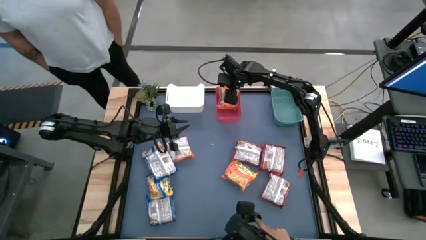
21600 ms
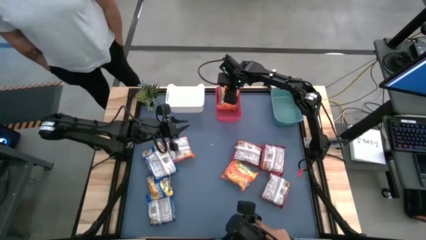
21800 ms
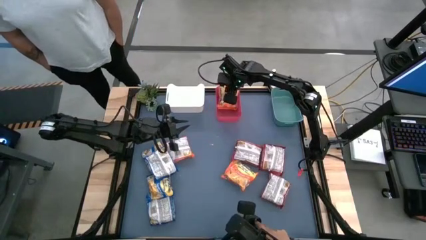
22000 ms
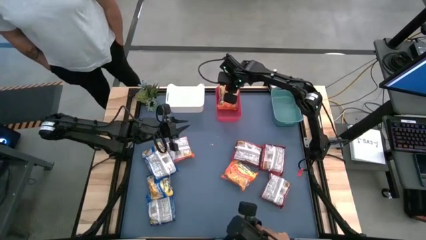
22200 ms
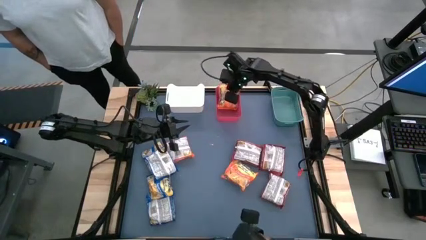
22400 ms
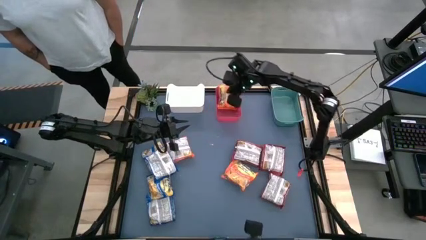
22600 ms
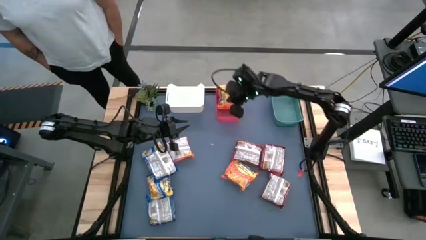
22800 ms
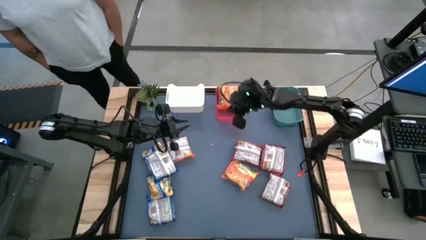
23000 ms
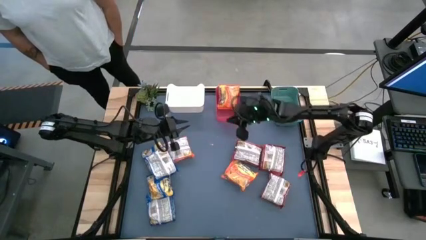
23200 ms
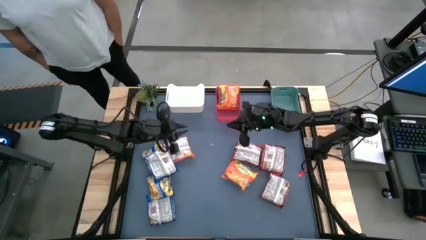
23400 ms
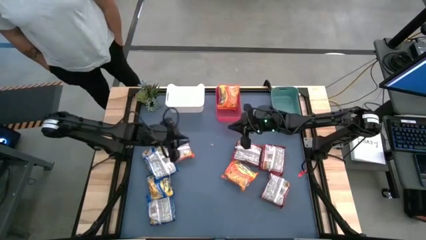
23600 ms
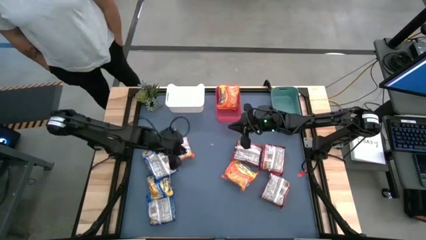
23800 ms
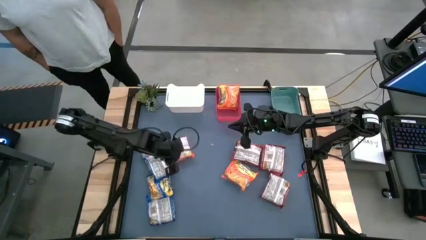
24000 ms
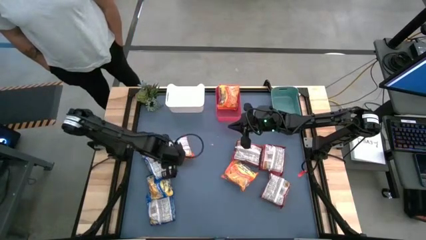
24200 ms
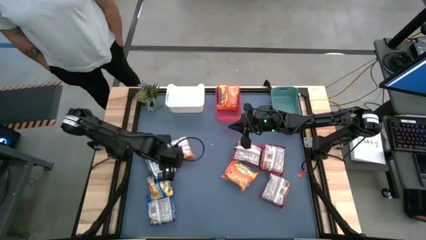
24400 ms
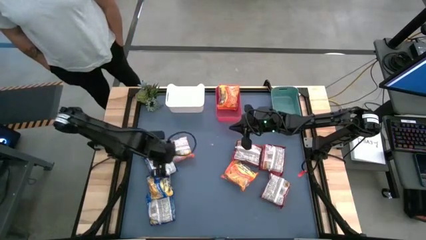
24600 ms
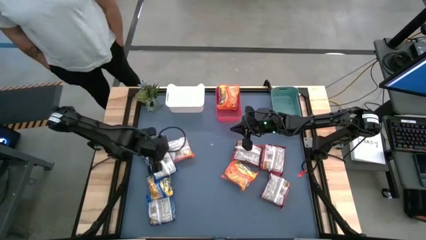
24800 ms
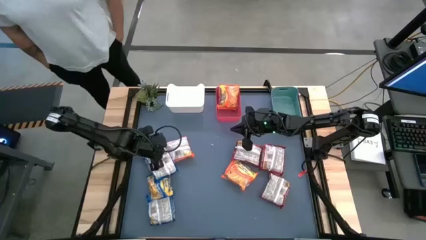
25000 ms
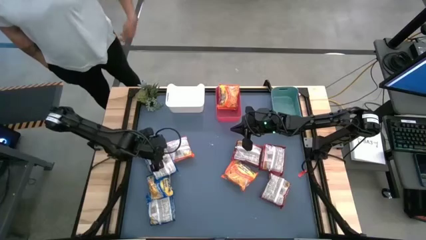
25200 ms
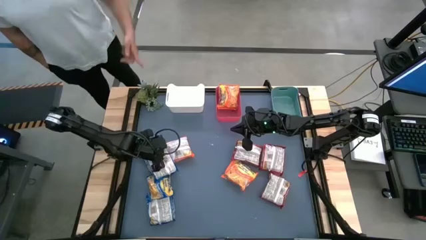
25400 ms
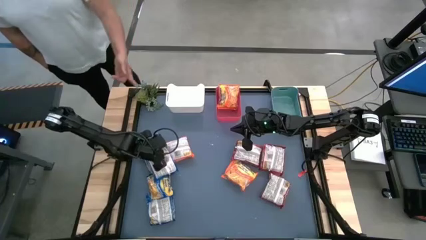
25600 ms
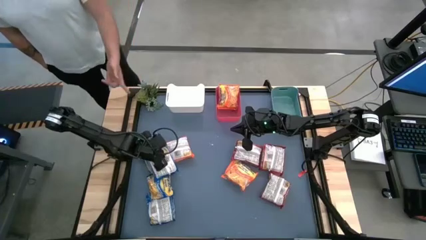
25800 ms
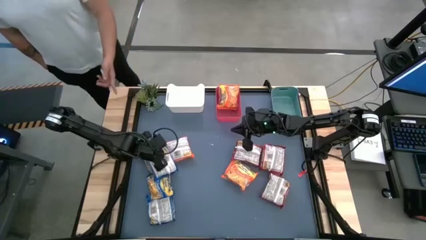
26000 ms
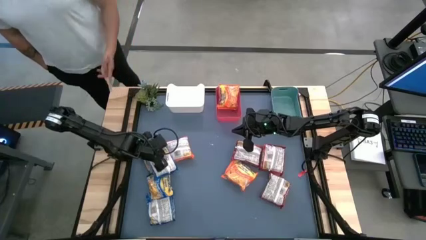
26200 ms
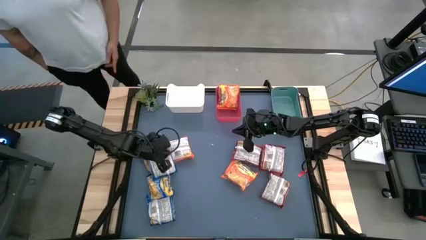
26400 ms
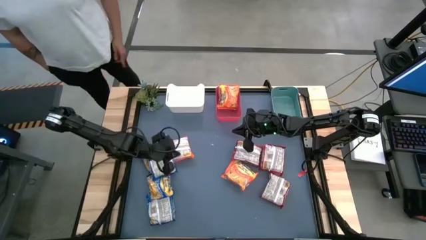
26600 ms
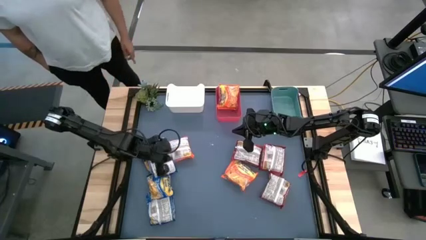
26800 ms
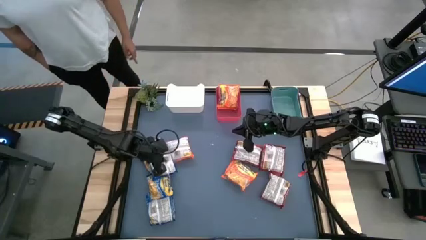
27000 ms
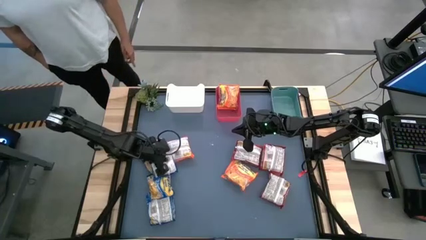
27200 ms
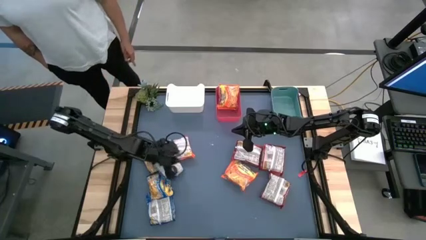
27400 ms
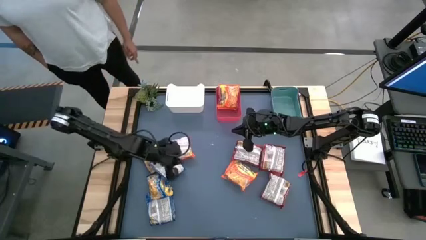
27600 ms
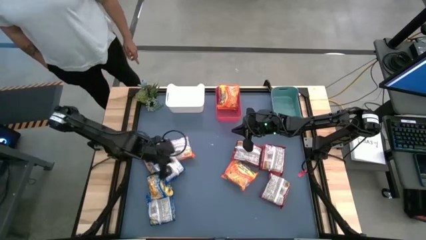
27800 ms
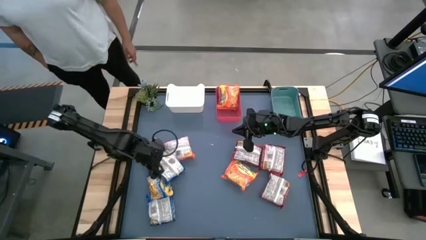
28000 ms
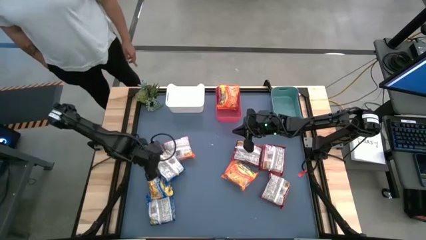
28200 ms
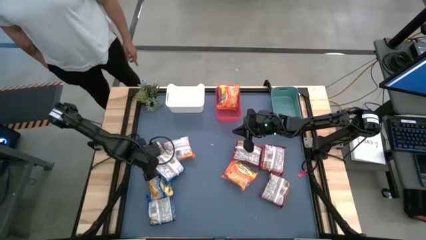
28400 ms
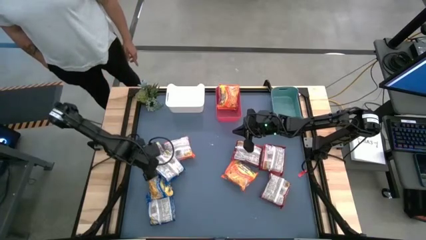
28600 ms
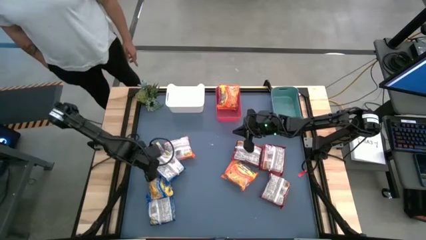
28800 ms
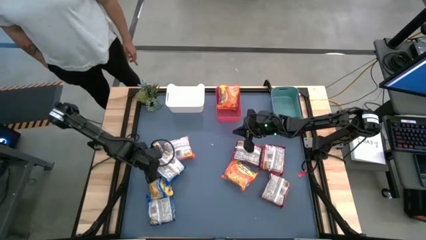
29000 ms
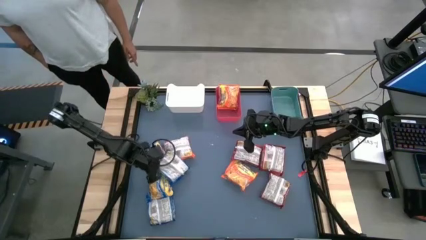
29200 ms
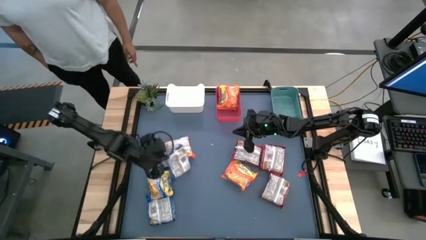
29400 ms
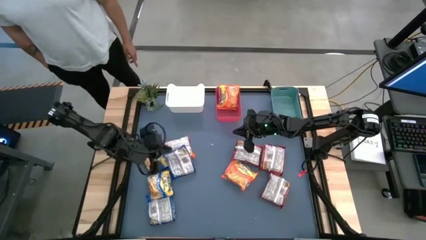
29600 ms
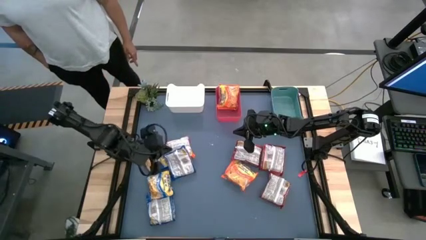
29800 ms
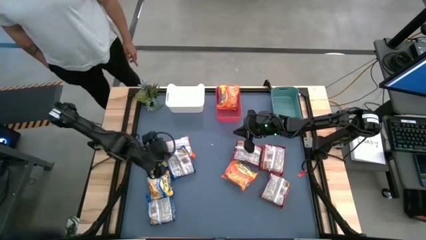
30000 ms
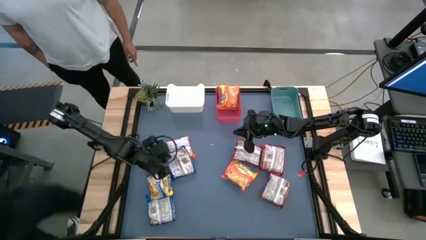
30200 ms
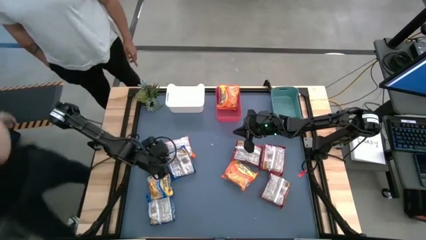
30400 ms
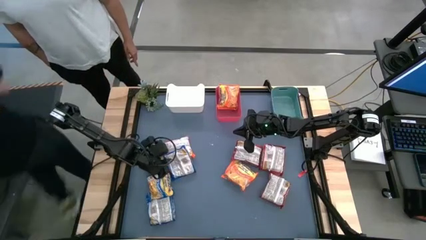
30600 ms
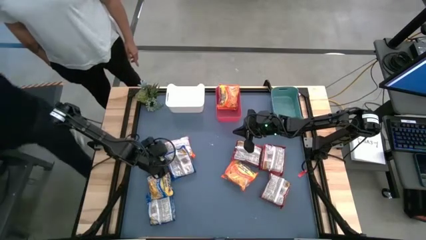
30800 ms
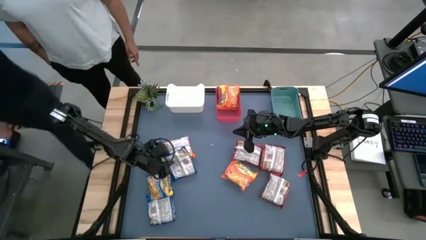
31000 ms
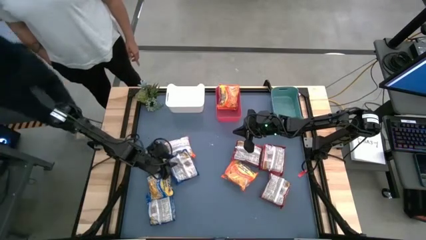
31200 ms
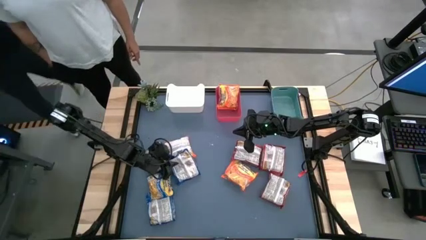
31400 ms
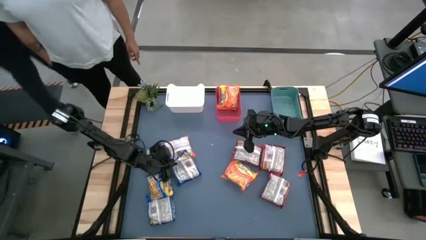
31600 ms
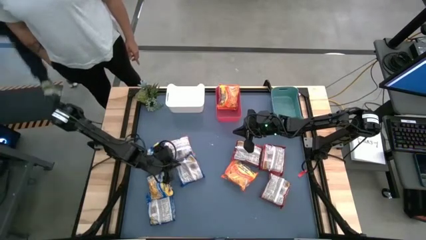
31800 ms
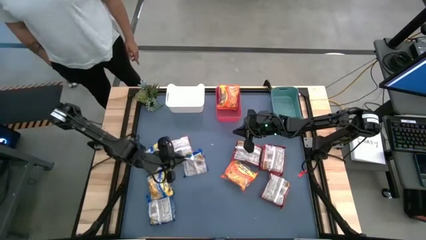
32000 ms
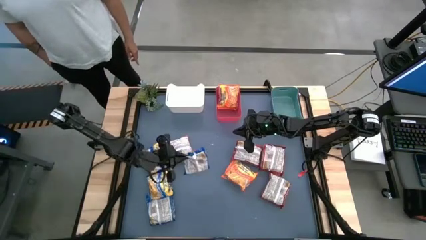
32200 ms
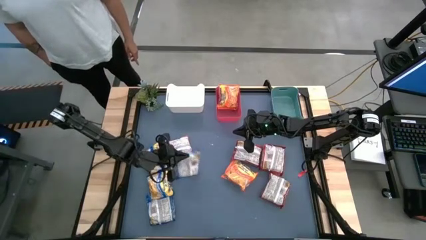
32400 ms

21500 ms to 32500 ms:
Task: Sort Maruchan noodles
Put the top right blue noodle pack into the green bin

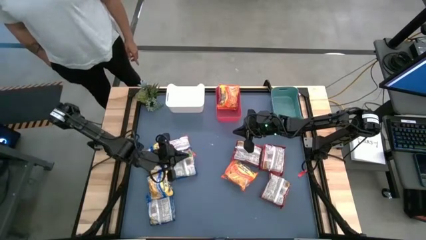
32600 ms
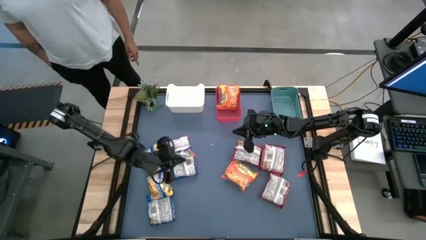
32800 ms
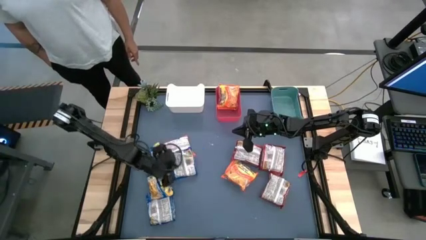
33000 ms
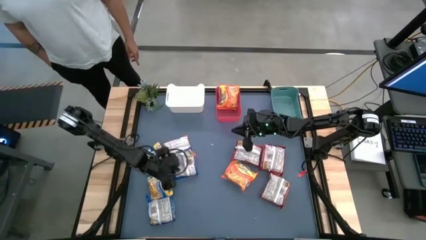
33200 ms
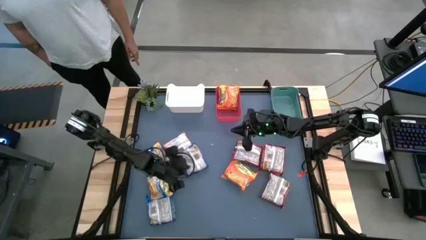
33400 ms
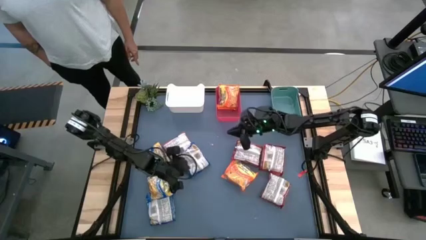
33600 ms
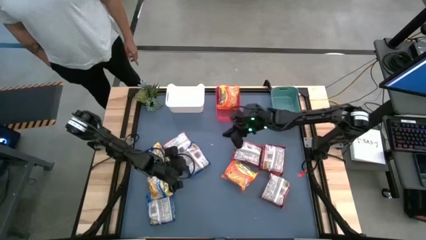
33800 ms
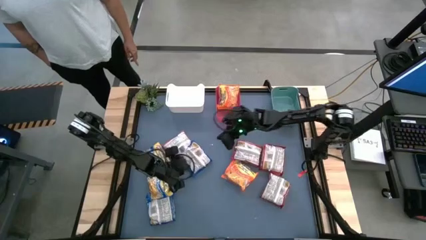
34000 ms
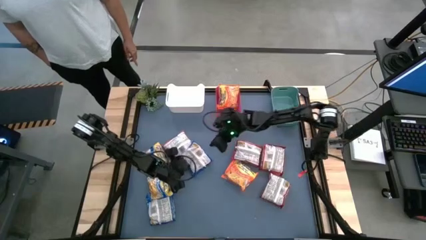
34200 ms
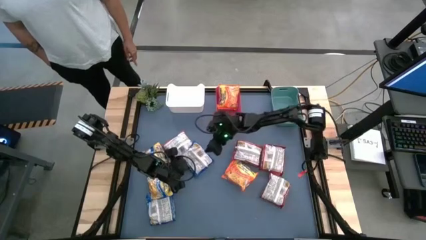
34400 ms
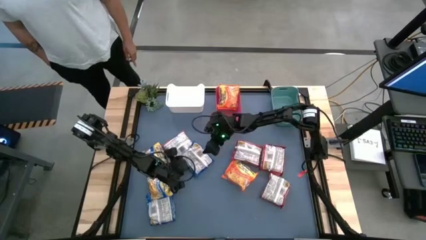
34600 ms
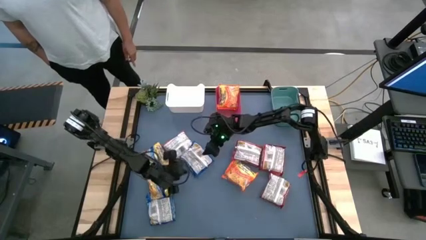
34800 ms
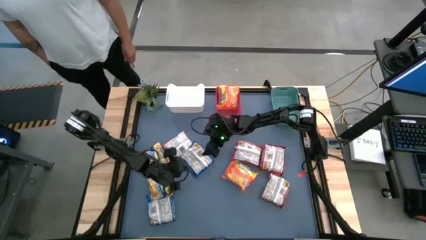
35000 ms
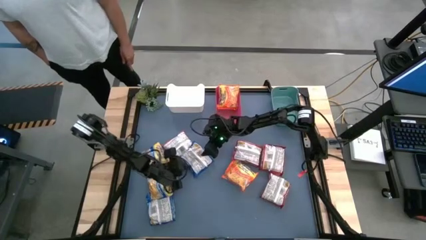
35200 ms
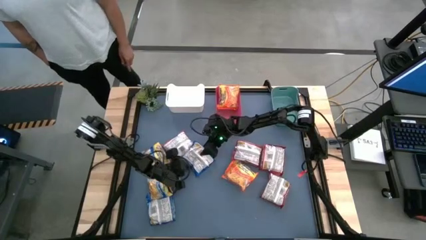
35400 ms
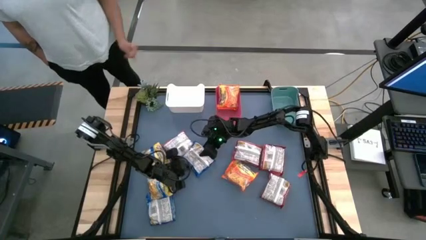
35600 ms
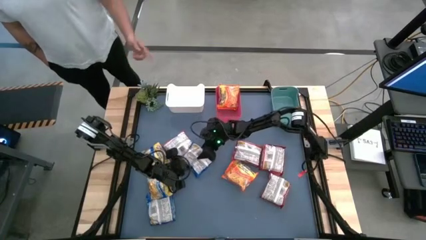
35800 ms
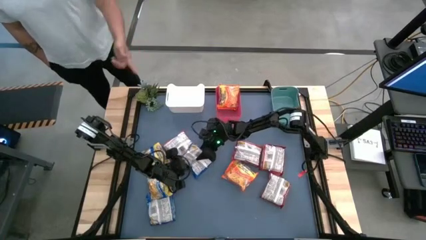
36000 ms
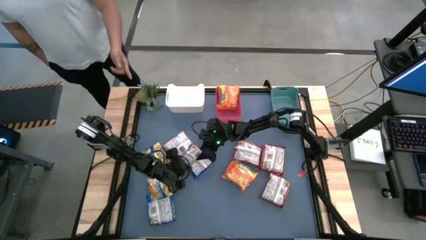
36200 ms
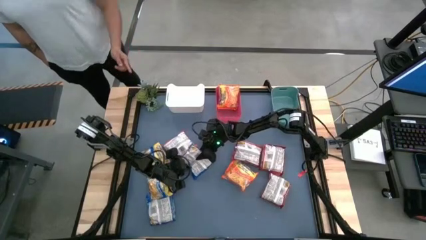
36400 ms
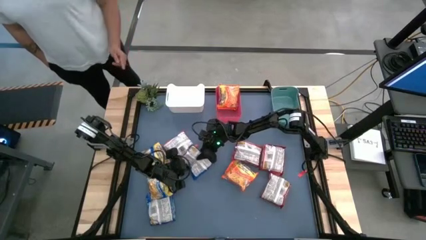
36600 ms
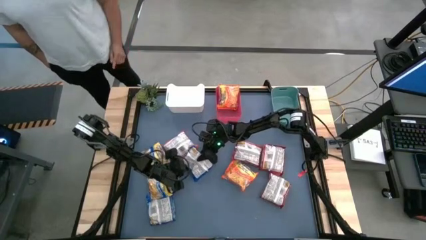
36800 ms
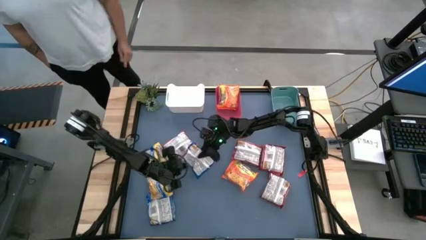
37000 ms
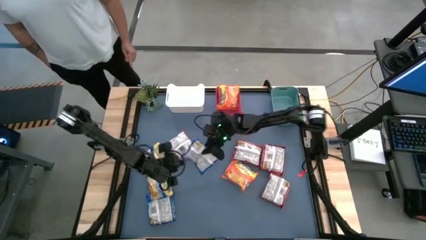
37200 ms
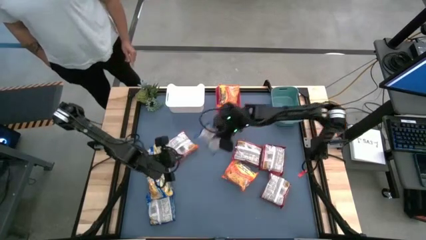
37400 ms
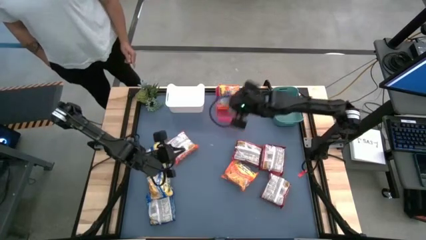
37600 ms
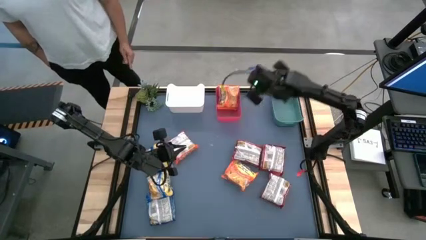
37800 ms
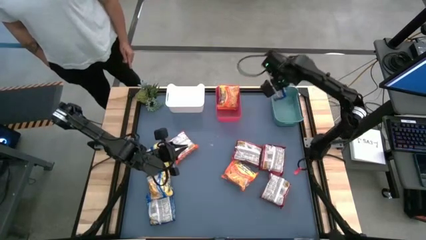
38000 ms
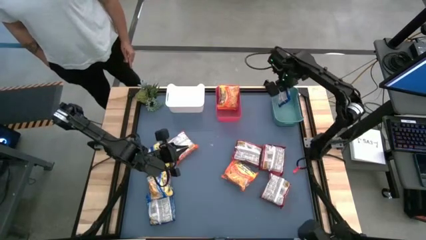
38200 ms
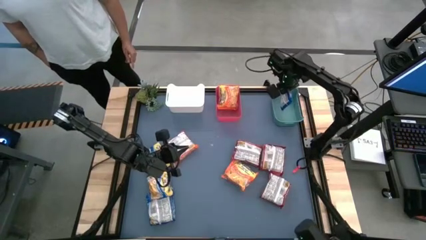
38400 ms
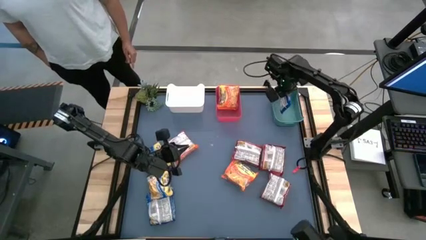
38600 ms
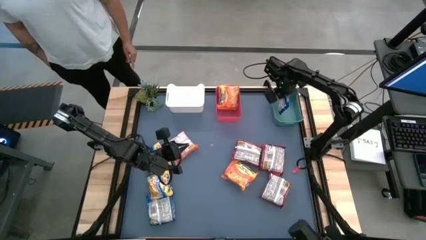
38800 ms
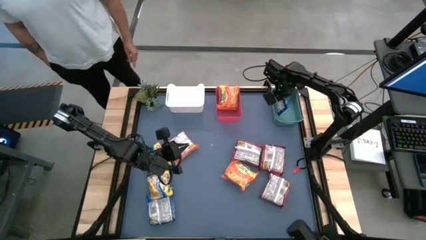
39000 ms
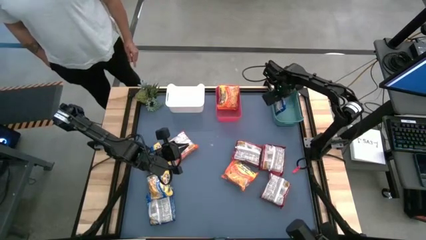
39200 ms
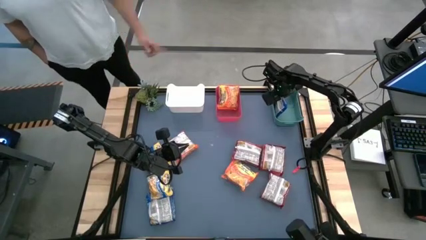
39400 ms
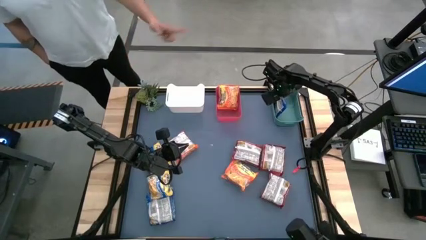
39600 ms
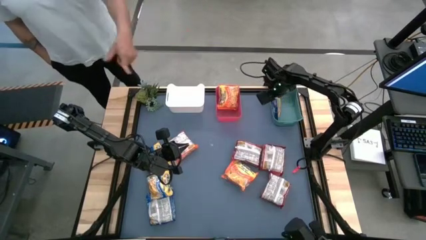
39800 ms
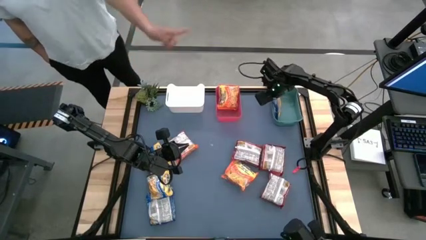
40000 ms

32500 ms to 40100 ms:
Put the top right blue noodle pack into the green bin
